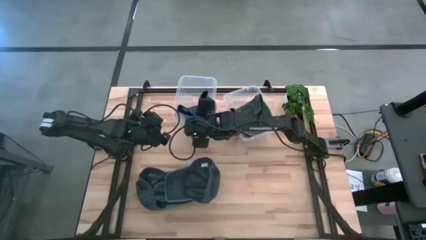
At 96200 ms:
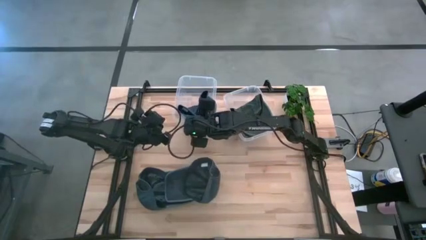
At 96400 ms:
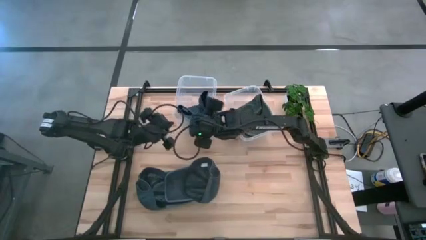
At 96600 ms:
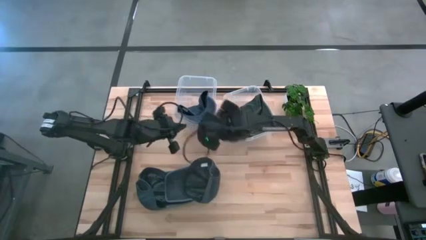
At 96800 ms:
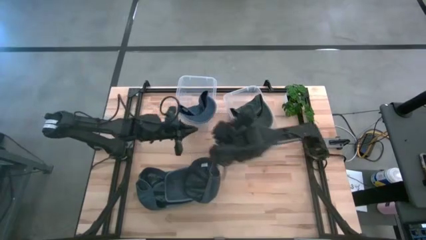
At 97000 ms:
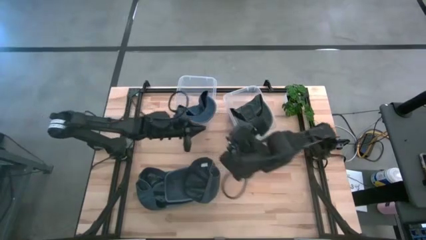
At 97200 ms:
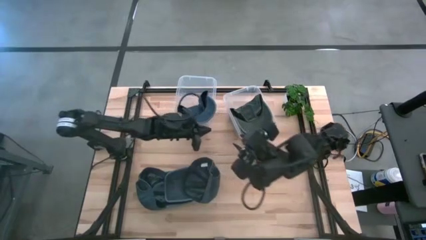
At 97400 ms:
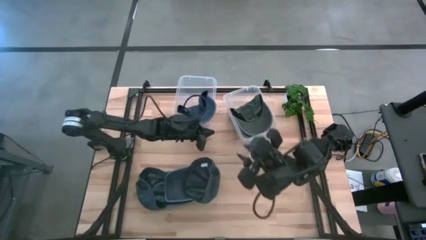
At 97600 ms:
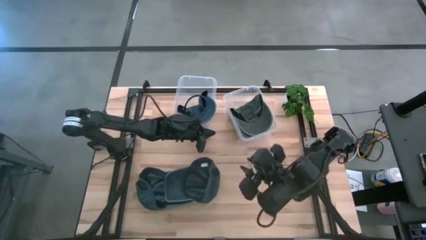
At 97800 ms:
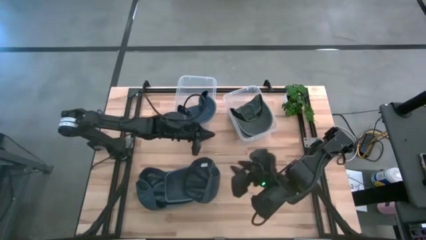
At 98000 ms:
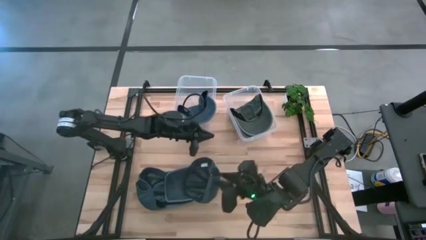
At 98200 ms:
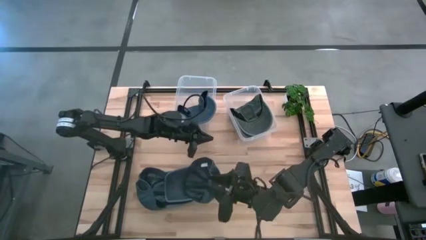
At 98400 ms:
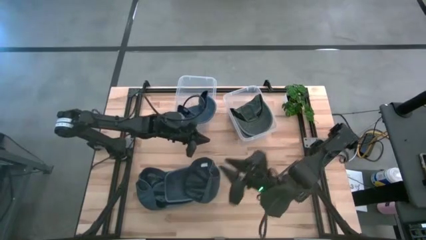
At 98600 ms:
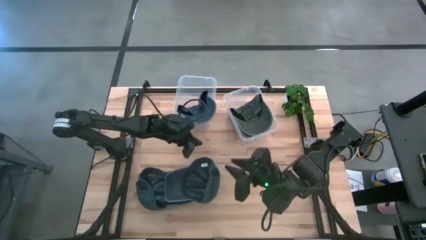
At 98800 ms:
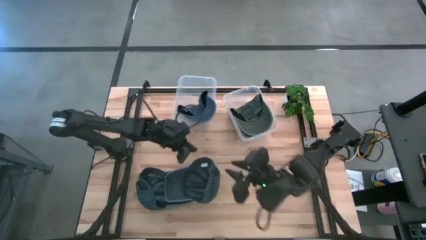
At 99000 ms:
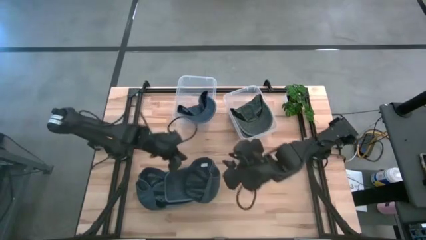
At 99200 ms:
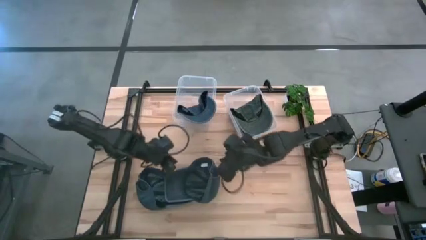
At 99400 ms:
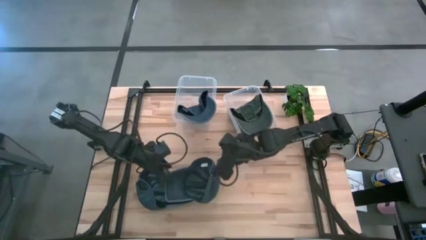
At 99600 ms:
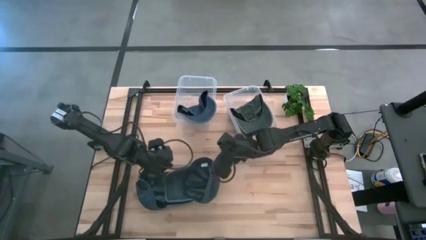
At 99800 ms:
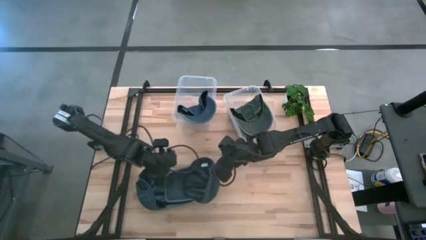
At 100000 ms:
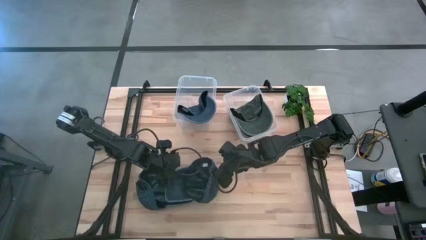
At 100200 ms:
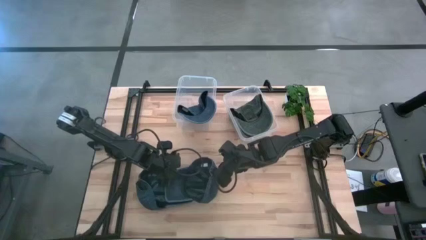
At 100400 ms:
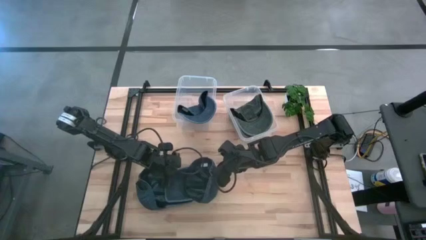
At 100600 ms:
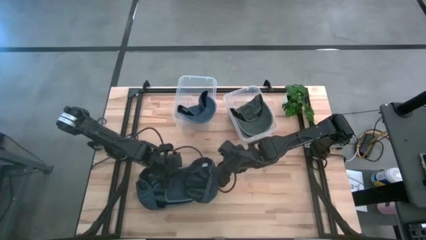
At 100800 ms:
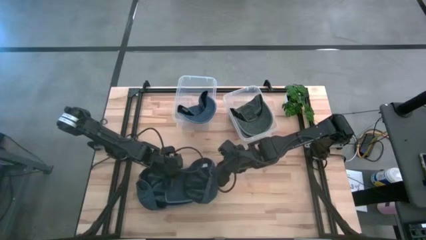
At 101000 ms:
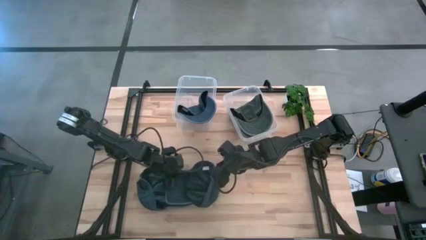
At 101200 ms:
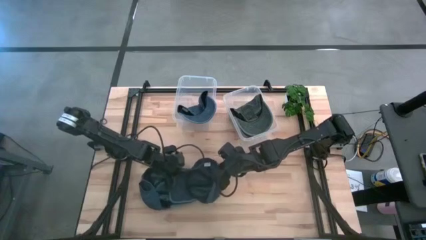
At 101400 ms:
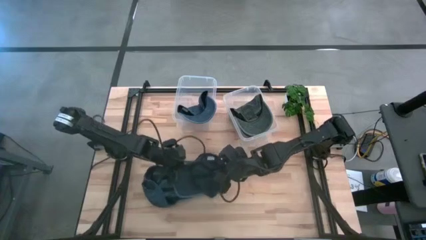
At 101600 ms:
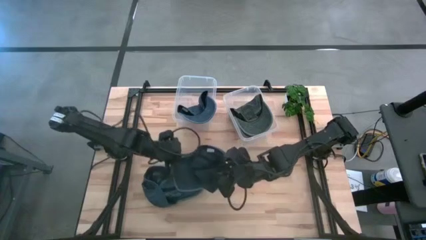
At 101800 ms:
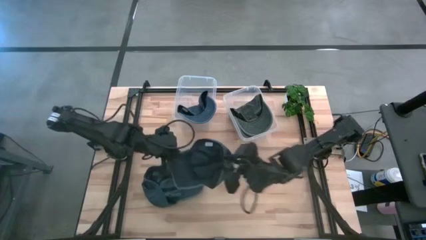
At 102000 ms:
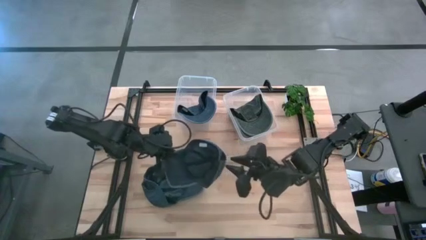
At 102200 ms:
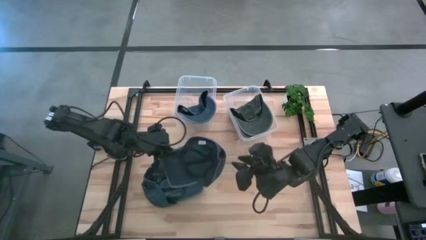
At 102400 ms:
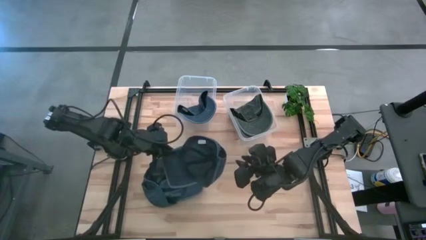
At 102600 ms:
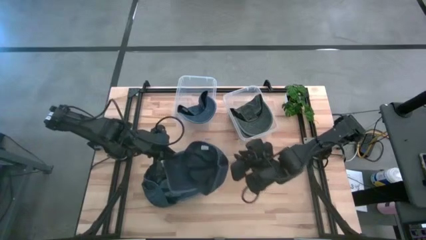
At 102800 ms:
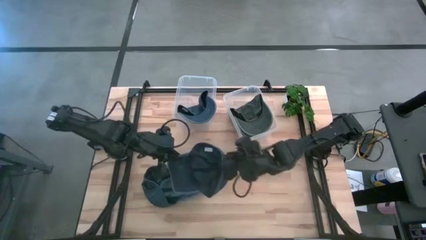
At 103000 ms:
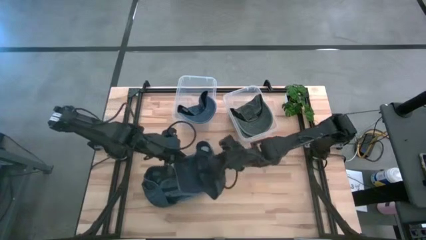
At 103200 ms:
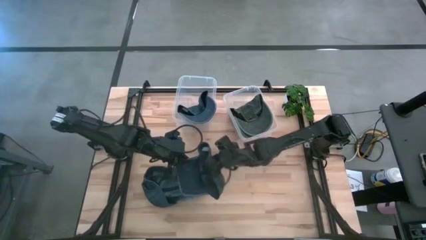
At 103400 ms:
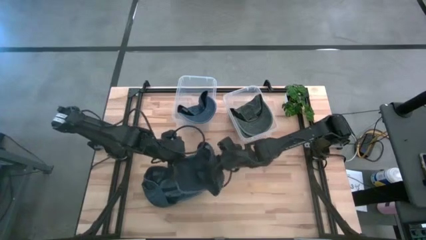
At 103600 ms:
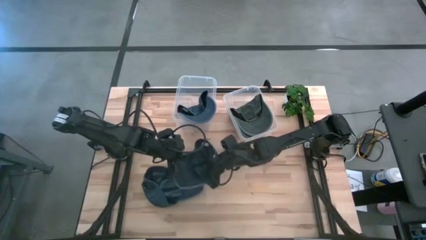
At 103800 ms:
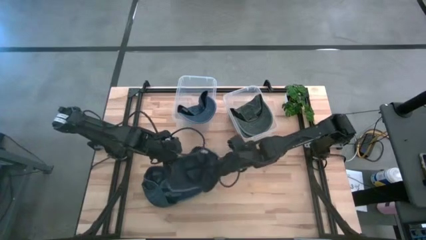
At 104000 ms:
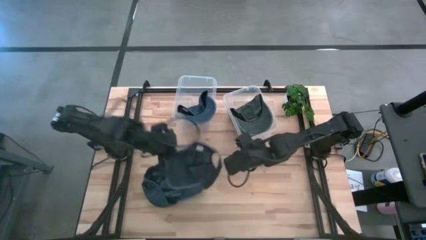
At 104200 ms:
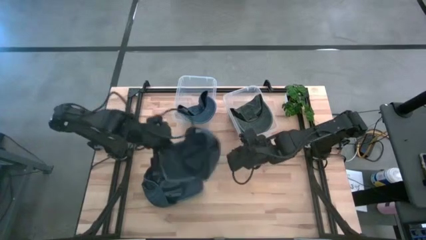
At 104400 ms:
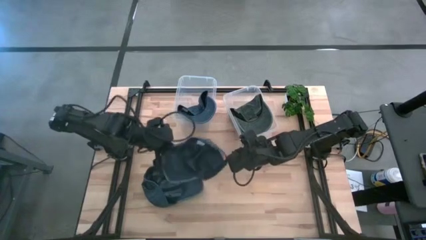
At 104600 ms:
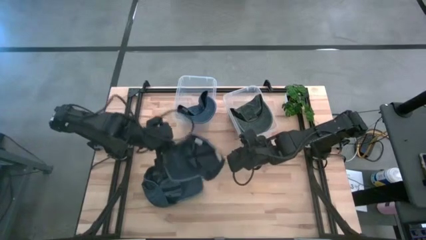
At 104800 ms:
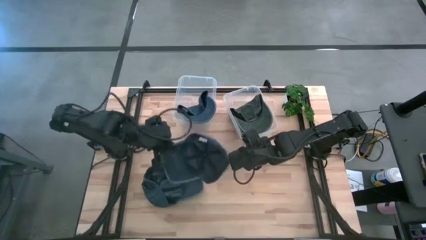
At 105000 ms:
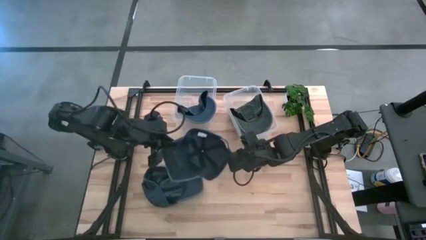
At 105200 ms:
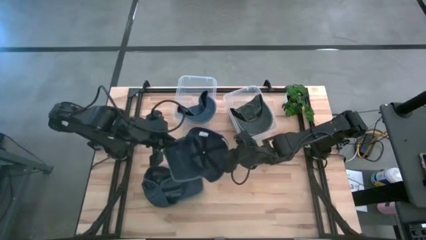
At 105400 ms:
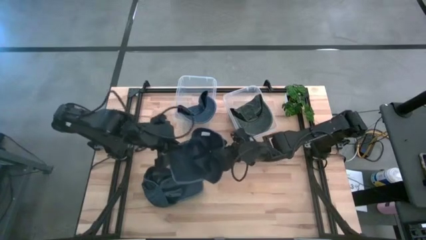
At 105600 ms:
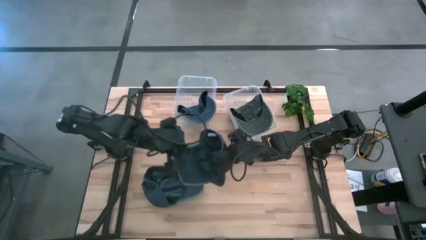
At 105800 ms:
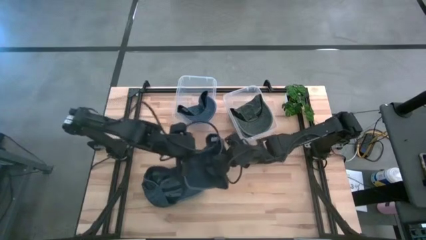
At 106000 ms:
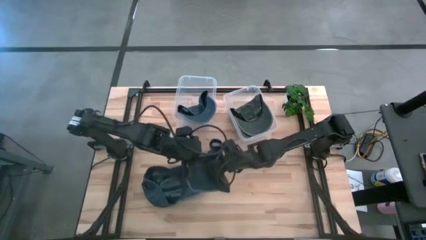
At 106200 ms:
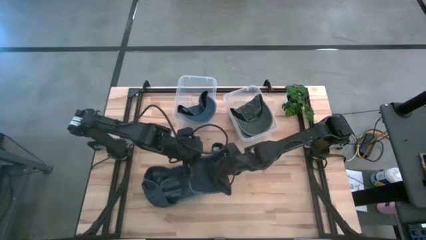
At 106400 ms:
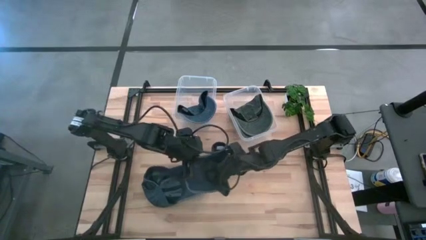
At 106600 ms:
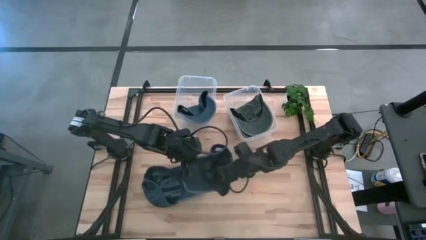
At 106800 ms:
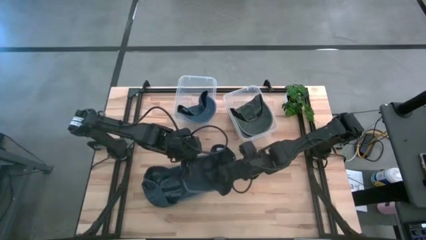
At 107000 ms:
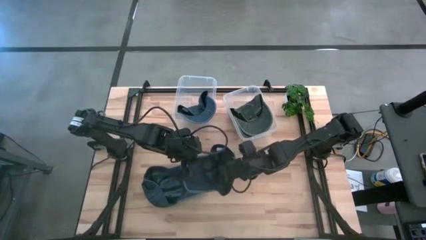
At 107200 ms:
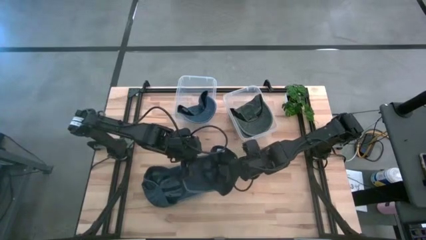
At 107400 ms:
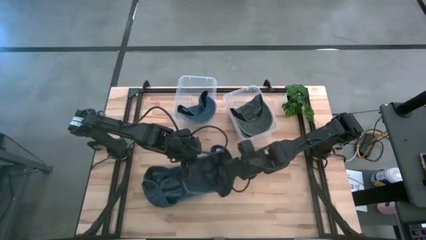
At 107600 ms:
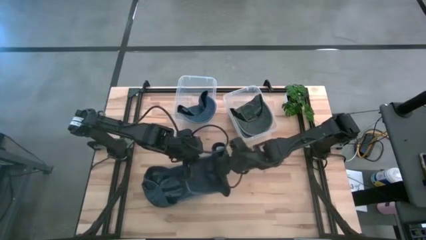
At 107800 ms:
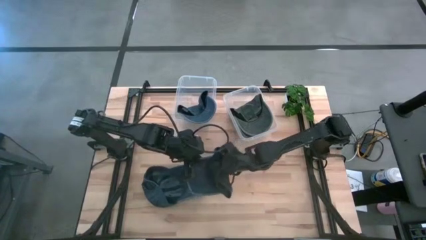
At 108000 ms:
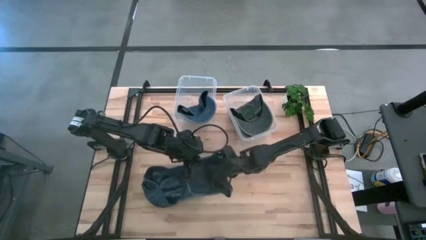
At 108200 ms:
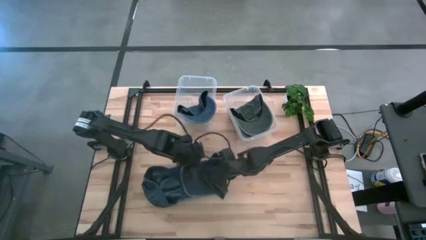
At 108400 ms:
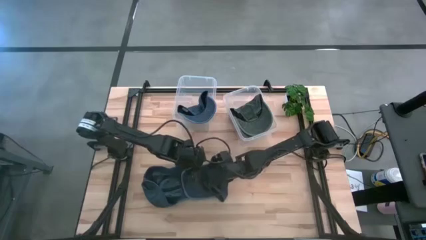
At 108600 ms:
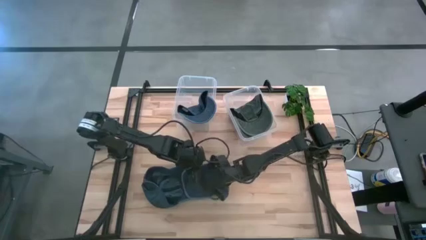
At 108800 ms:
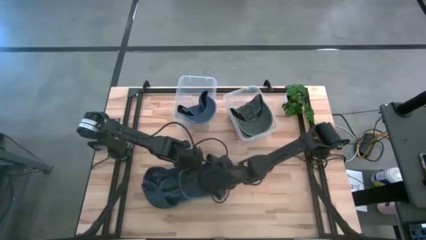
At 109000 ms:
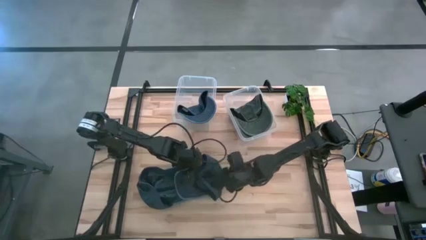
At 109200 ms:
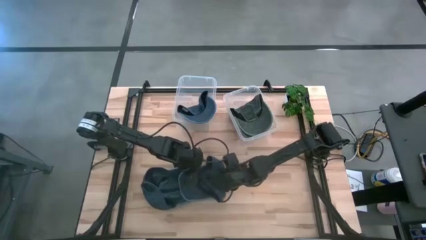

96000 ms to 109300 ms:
Task: Pick & Place hat
Put the right blue cap into the left bin

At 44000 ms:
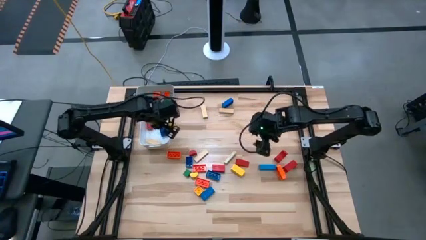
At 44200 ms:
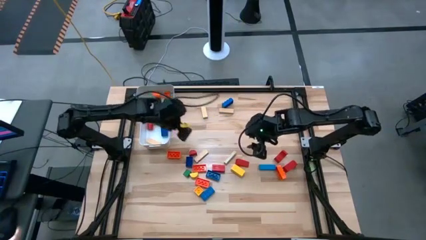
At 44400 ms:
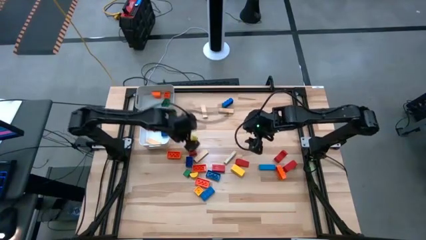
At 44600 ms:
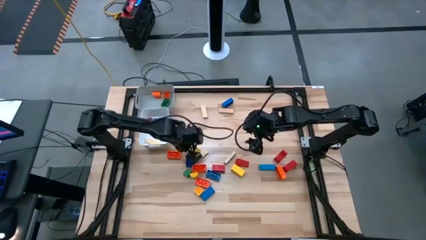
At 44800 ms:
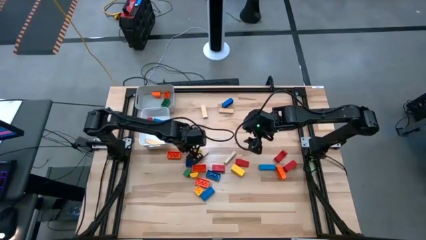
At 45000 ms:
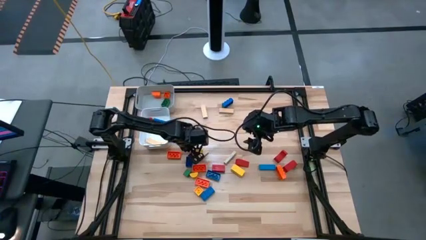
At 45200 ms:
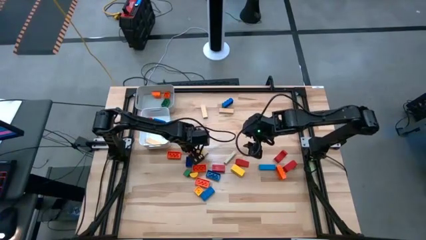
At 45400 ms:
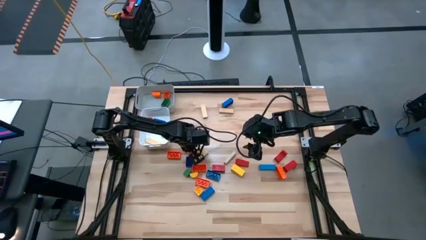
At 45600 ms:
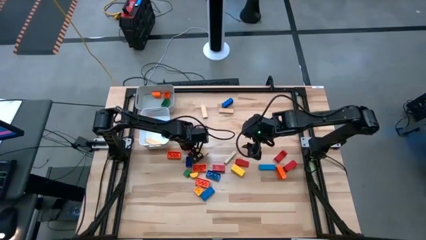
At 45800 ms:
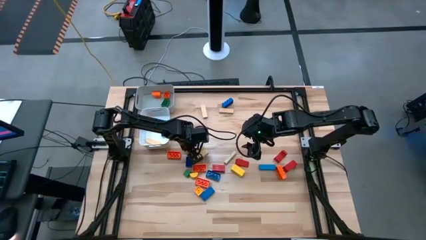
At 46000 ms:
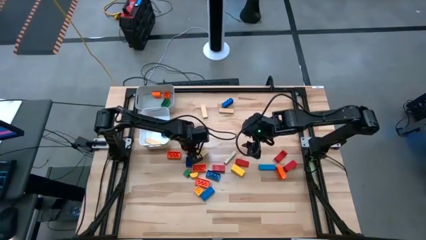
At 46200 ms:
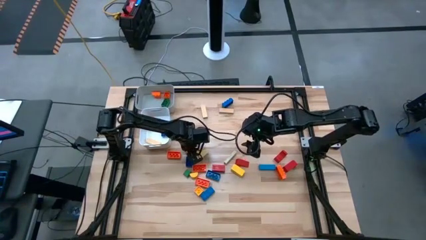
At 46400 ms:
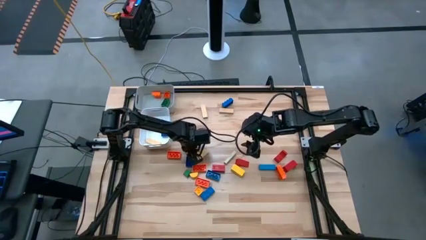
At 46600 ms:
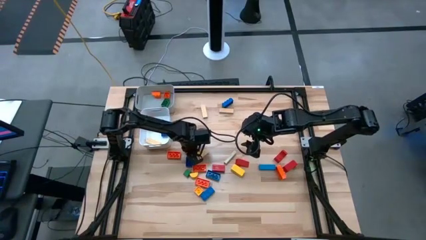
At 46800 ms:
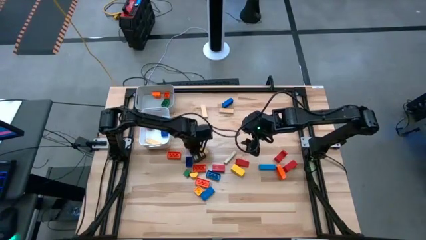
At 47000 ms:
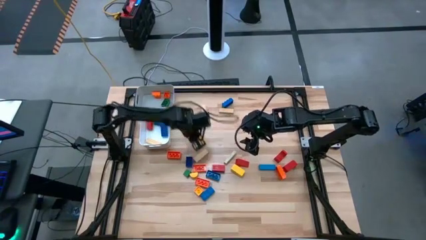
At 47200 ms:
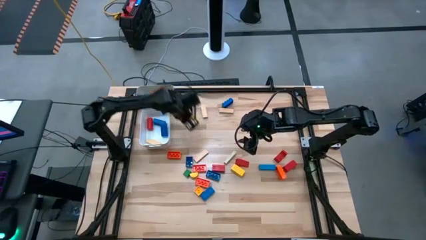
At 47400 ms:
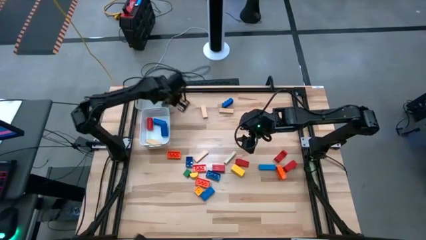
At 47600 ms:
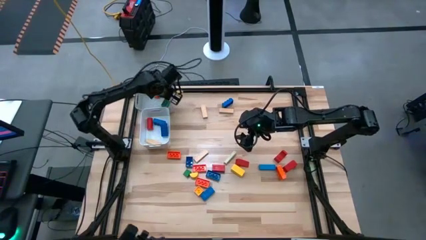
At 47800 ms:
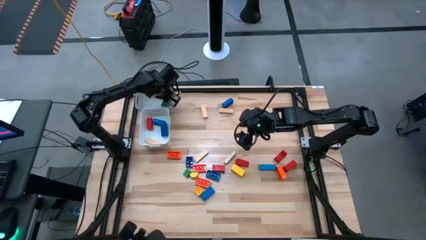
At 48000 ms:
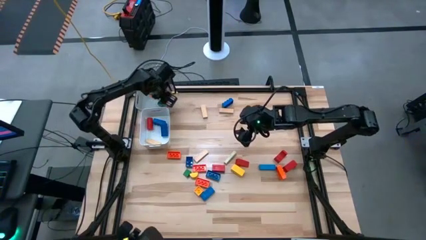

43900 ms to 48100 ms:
Task: Sort blocks by size
Put the small red wooden block into the gray bin
